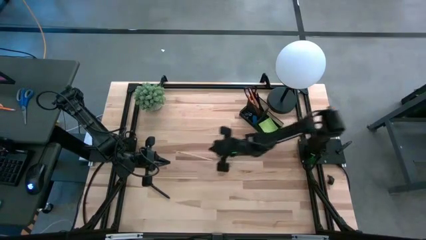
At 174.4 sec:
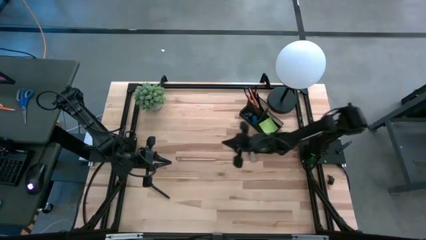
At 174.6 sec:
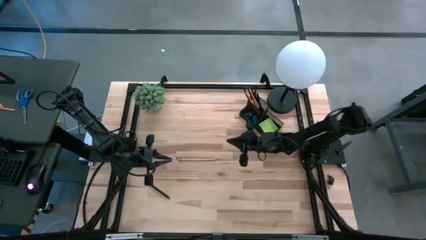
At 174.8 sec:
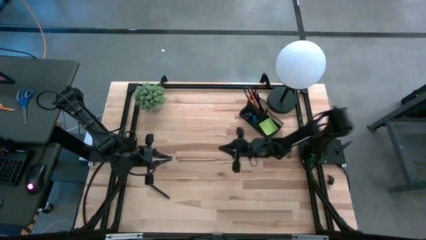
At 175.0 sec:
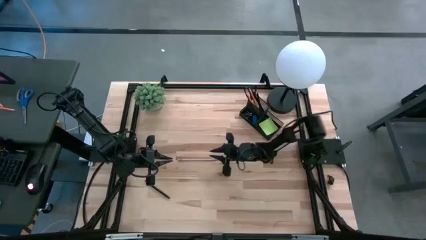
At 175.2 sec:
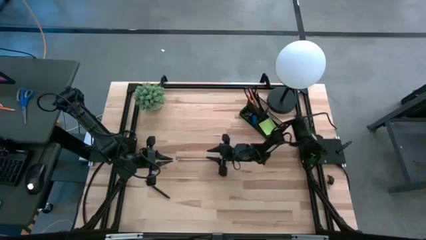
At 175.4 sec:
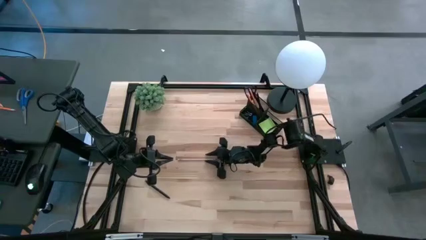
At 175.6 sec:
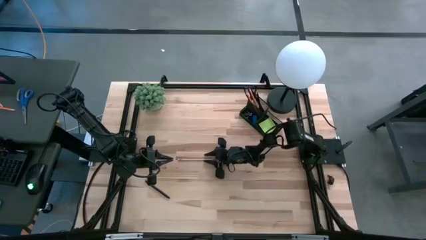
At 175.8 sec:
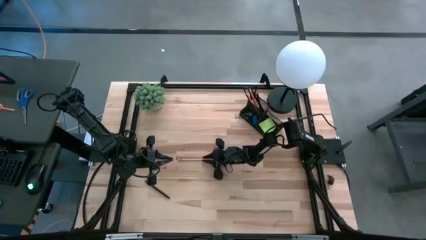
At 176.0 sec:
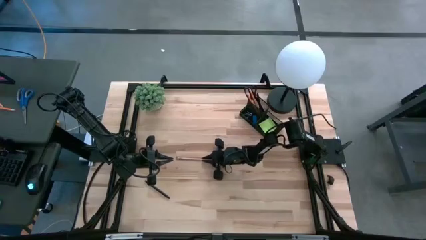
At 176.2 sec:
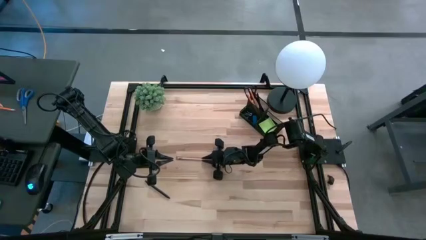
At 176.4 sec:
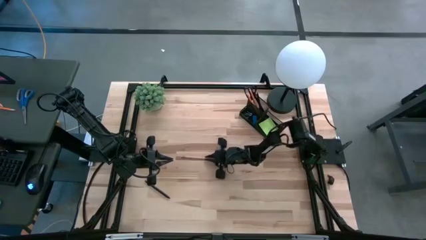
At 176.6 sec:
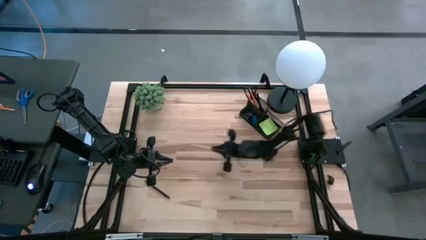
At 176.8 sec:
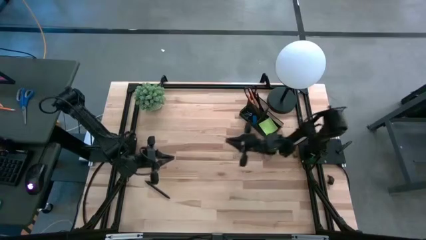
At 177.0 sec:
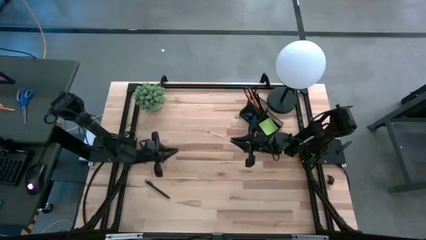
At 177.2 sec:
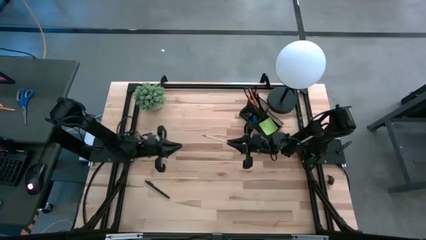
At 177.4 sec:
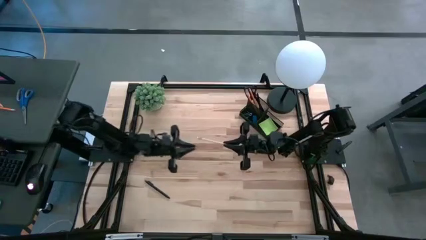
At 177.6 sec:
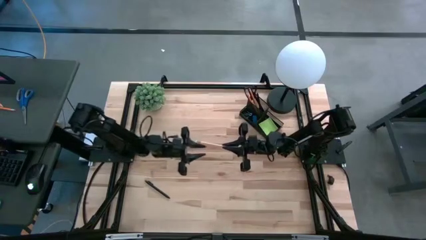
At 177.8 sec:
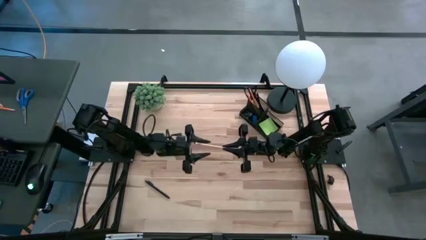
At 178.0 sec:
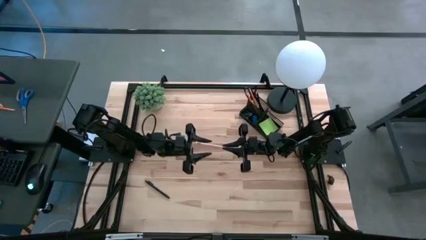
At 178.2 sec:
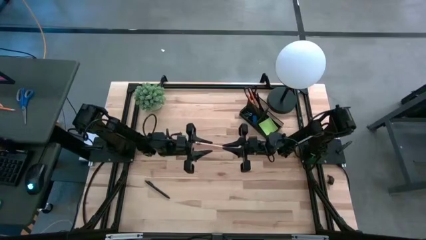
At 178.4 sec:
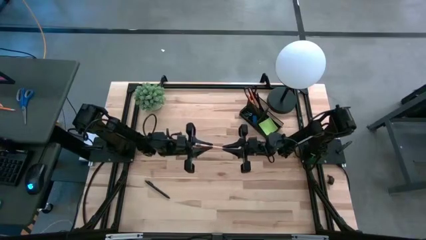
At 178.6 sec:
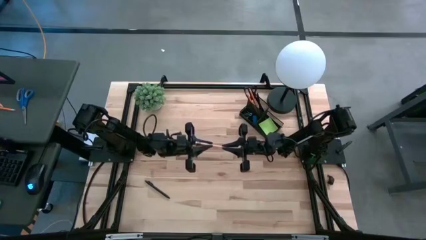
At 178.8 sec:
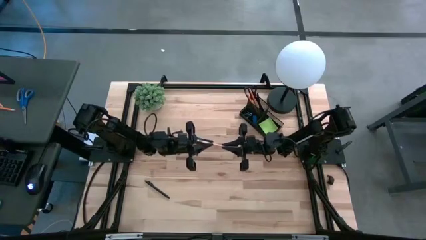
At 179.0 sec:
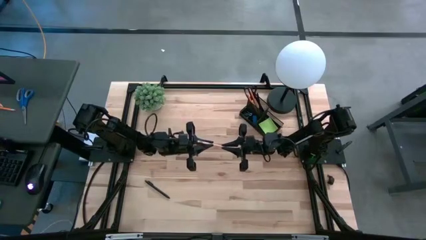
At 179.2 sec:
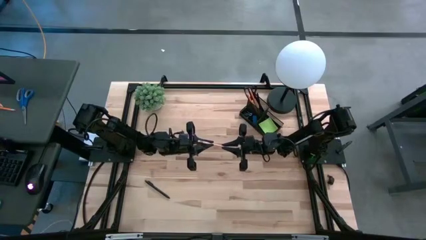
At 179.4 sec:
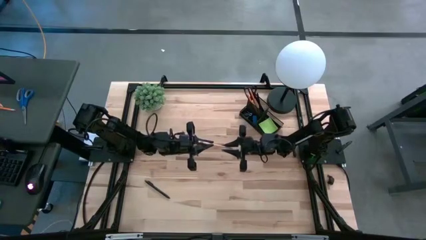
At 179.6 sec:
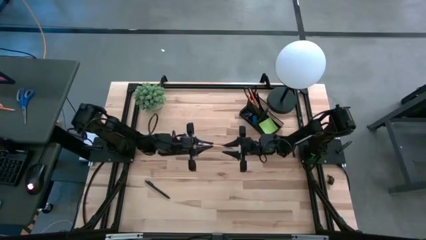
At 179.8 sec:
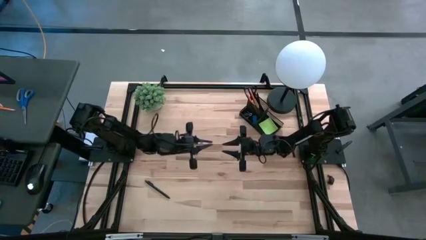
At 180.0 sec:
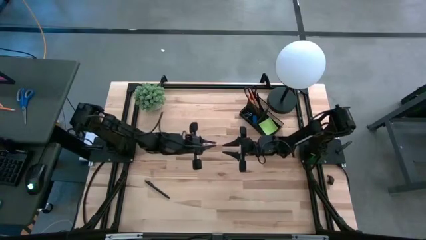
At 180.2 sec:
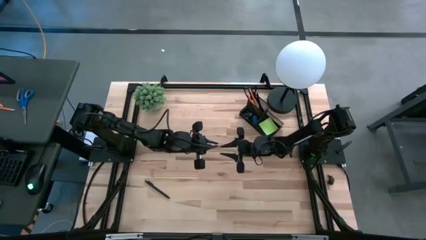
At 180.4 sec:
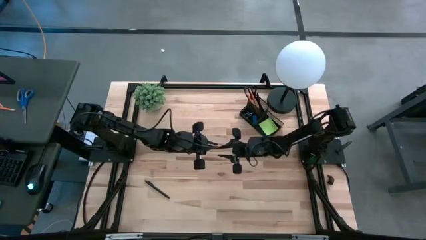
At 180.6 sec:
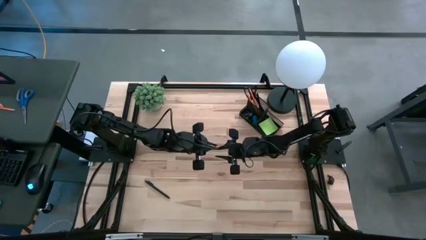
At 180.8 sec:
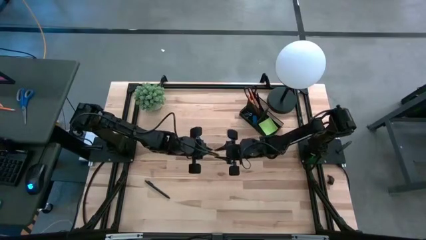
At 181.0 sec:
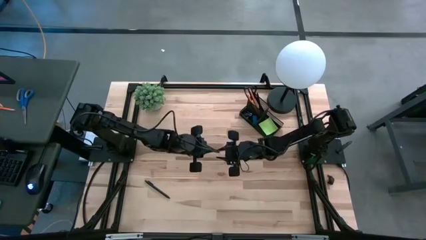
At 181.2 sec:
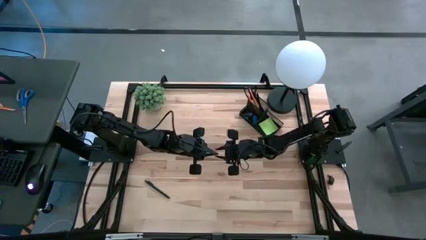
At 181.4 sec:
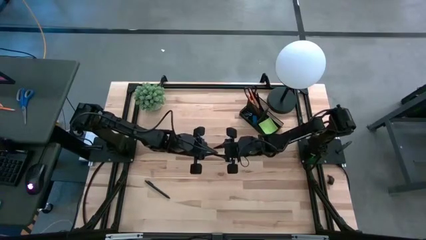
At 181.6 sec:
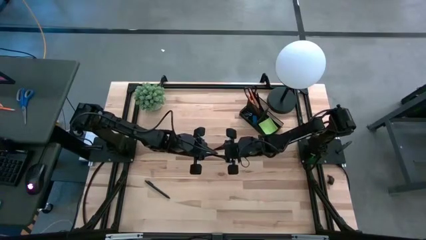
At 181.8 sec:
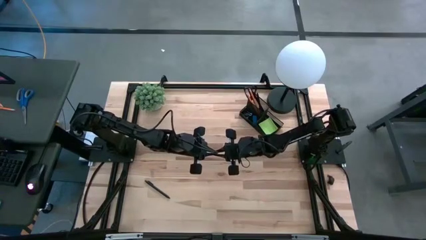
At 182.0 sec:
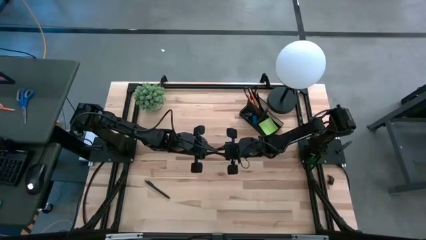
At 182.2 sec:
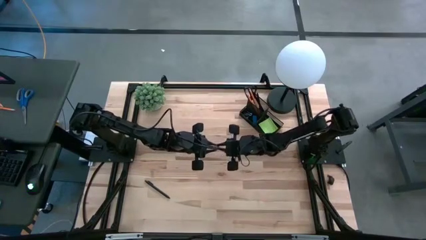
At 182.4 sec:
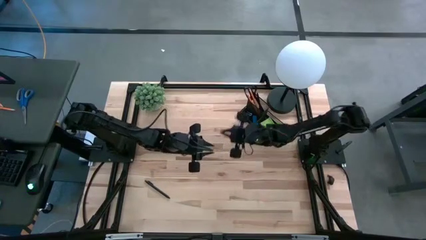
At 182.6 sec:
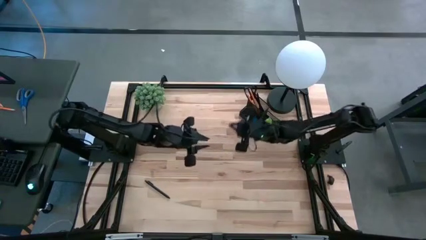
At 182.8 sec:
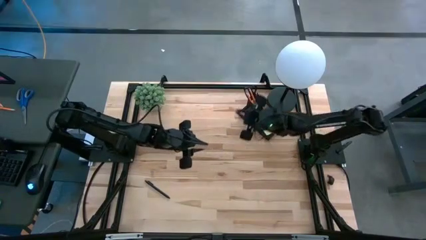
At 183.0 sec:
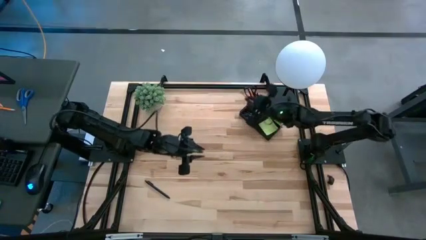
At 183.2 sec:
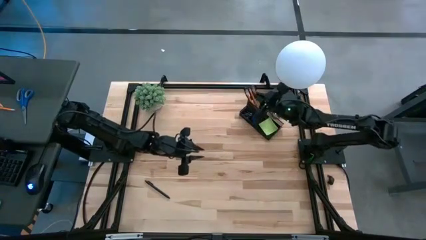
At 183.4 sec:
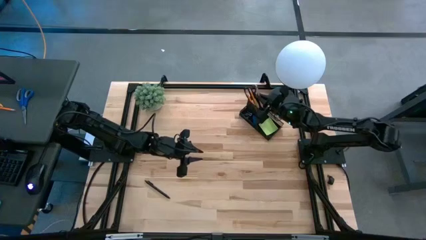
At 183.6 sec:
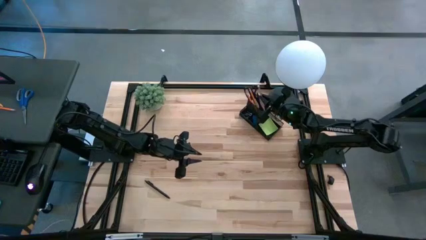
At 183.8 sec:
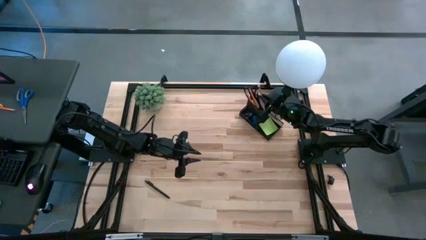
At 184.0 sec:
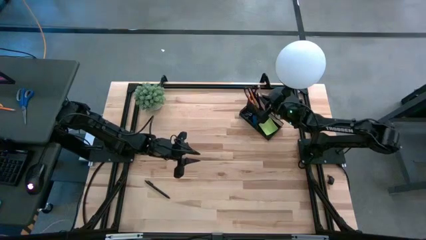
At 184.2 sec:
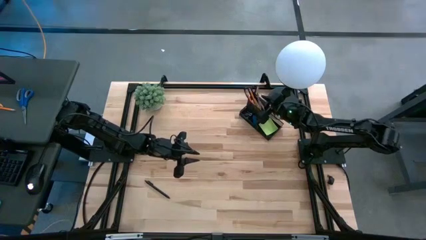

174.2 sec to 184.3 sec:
Task: Pick and place office supplies into organizer
Put the pink pencil into the black desk organizer

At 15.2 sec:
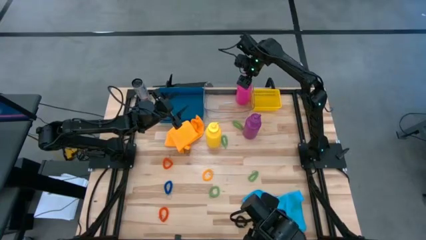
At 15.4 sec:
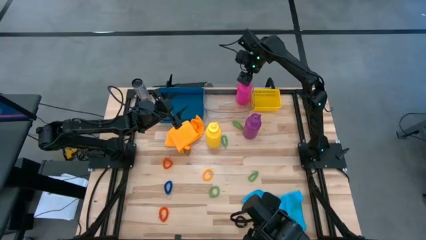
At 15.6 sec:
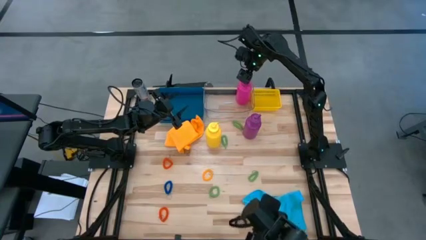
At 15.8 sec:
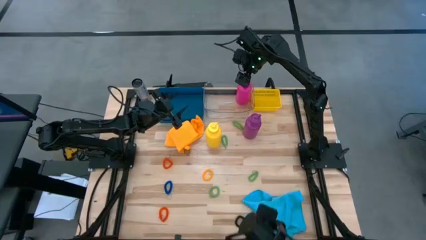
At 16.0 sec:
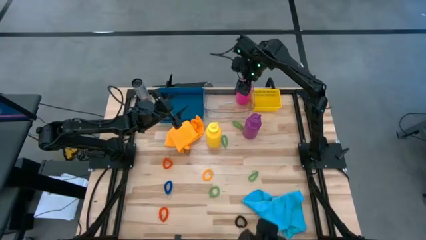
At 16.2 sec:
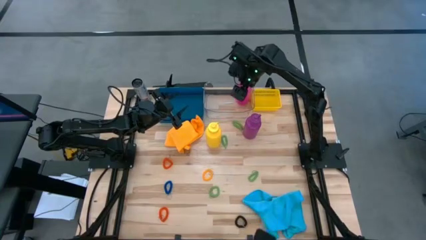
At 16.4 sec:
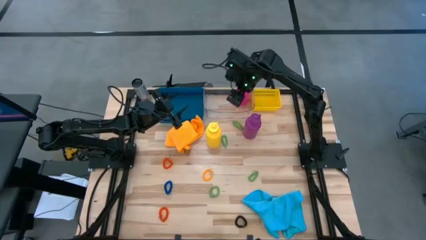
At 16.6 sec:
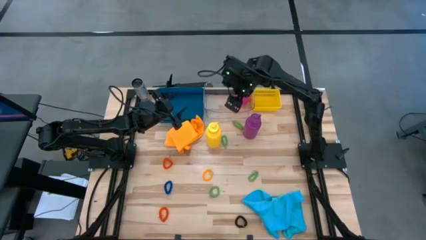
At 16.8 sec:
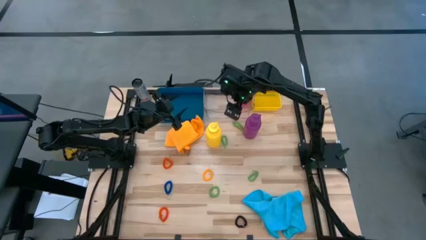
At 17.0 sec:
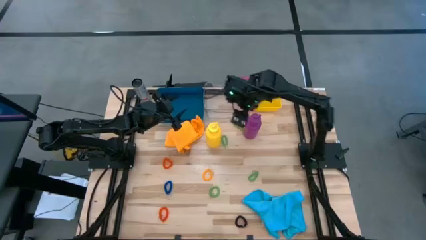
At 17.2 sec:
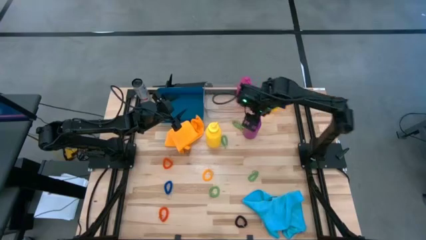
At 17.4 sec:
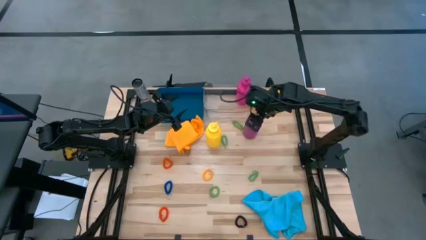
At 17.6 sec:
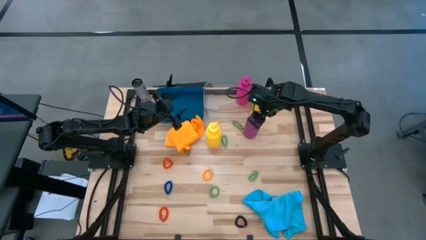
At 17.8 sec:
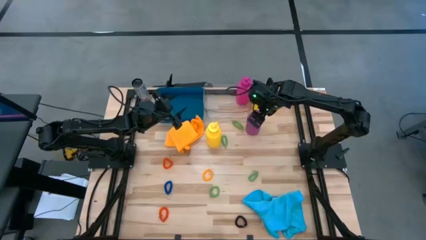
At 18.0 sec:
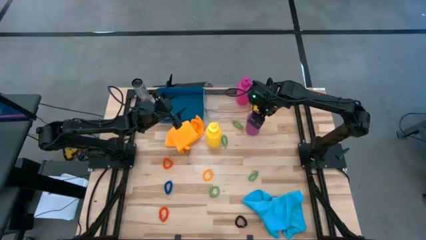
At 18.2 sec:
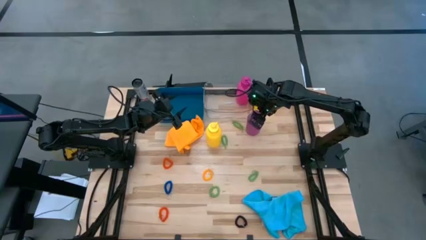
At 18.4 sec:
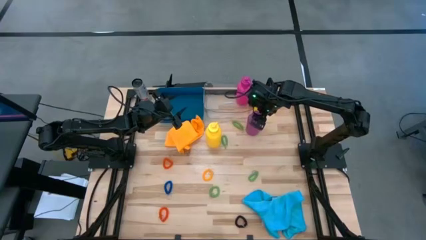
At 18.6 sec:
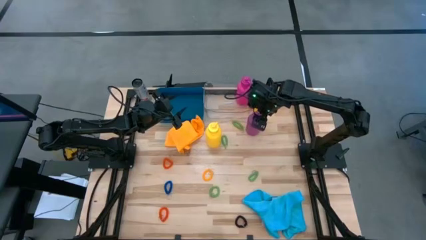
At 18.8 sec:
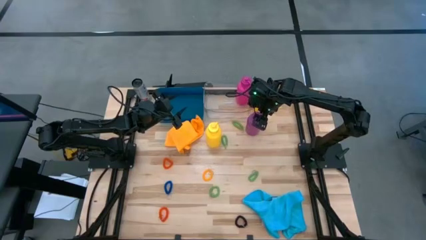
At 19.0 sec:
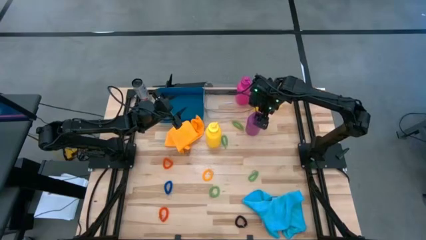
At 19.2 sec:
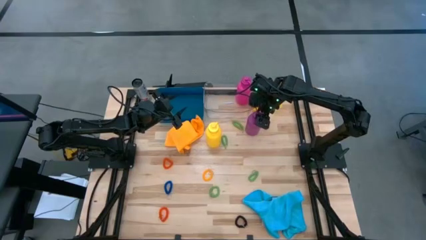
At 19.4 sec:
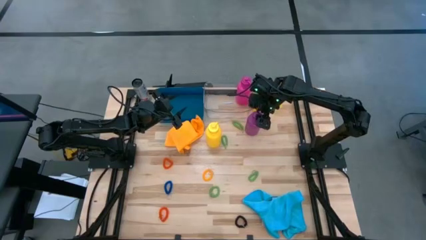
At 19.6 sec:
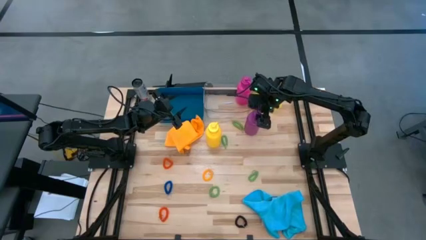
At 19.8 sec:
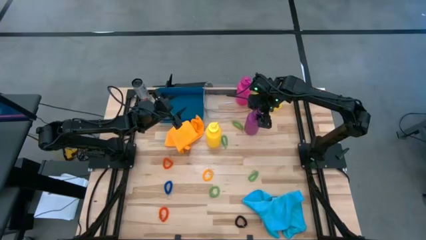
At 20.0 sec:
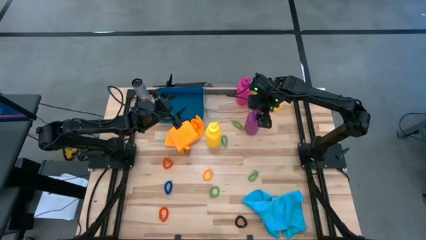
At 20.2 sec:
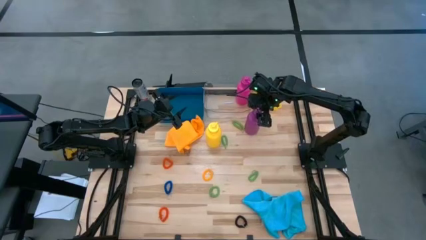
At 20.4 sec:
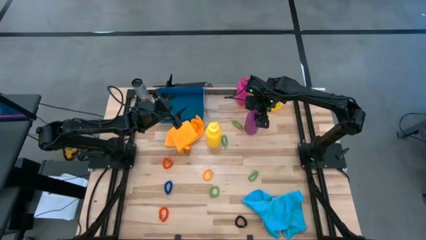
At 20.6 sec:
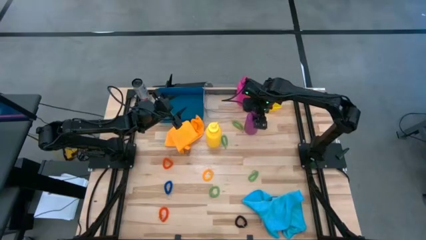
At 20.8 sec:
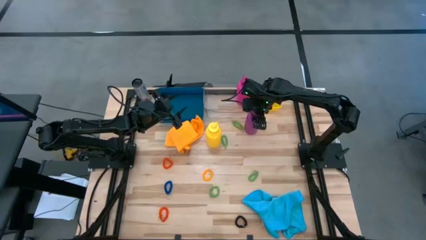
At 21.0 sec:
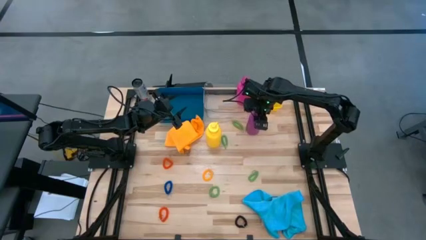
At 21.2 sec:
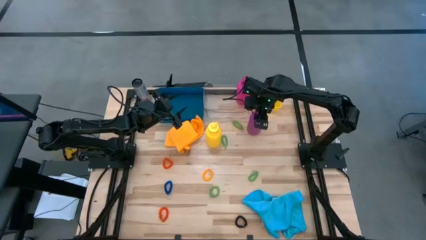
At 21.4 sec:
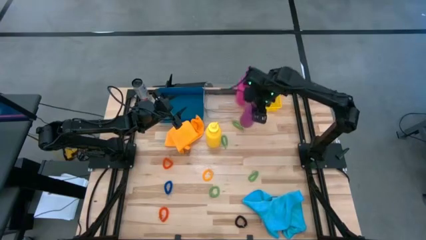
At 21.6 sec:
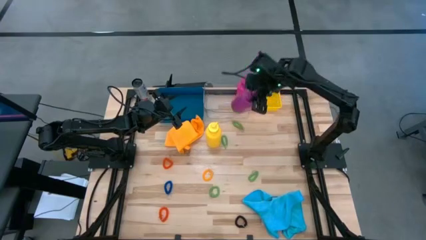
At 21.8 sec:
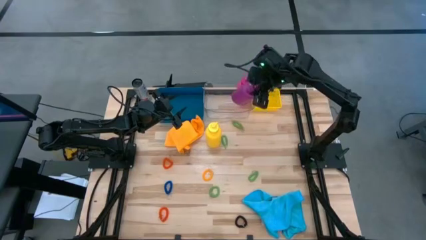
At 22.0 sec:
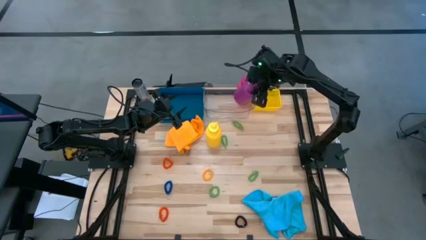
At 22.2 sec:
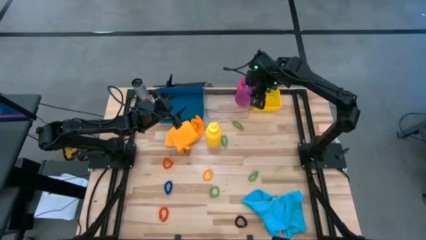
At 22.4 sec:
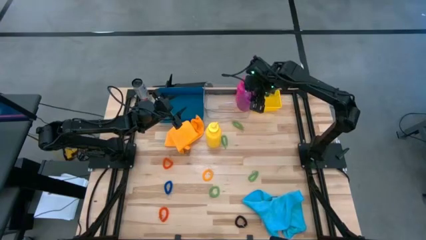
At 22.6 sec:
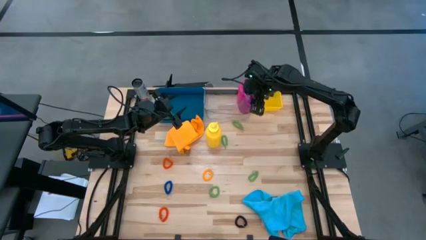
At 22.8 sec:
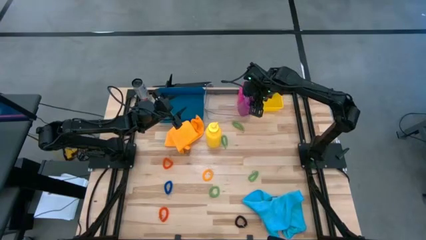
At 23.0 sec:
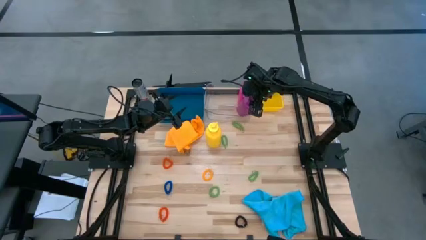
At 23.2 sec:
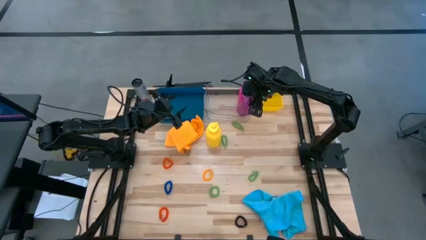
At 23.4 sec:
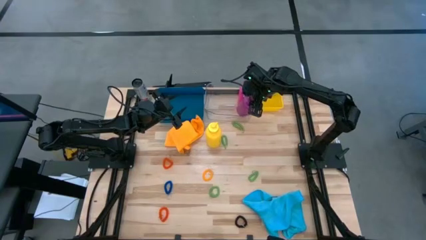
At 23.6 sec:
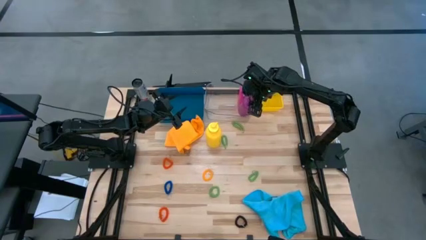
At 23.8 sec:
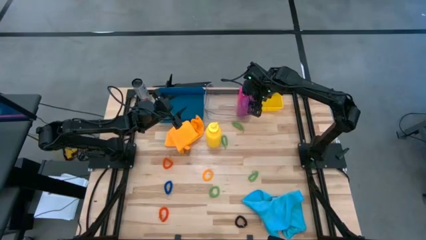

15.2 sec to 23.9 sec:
Task: Pick & Place Sports Items
Put the purple tumbler into the transparent bin
